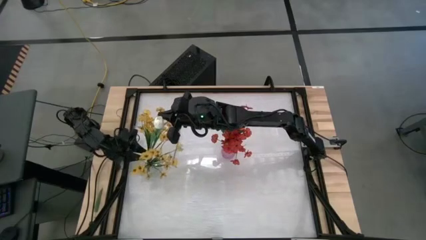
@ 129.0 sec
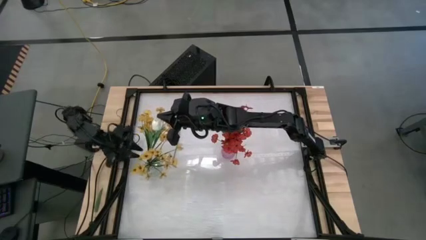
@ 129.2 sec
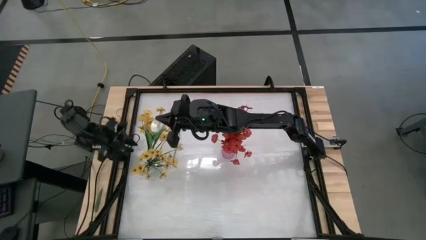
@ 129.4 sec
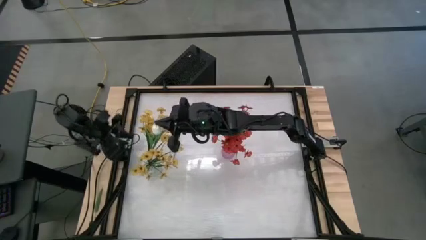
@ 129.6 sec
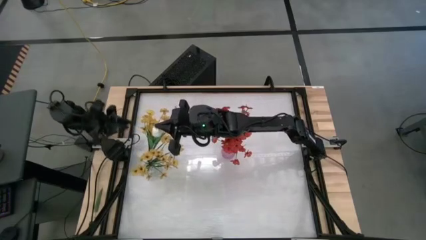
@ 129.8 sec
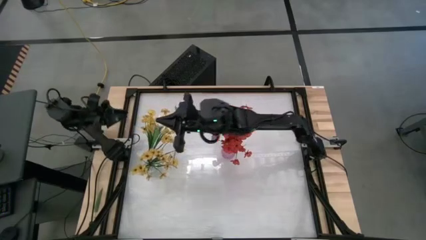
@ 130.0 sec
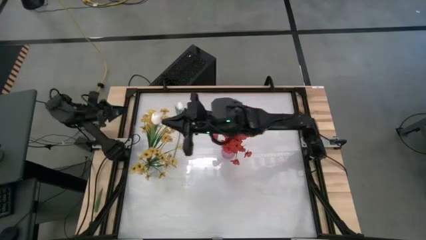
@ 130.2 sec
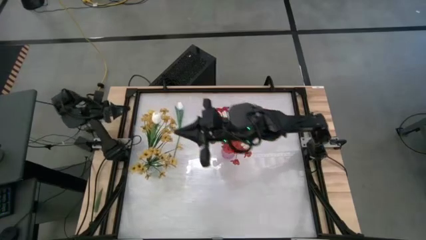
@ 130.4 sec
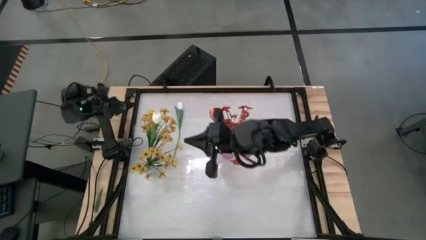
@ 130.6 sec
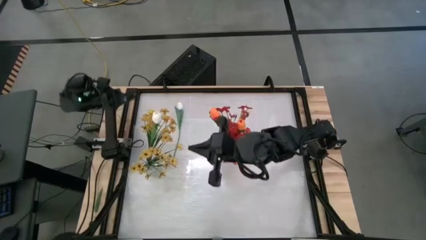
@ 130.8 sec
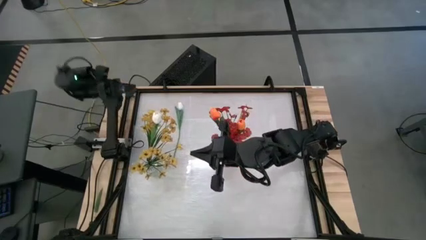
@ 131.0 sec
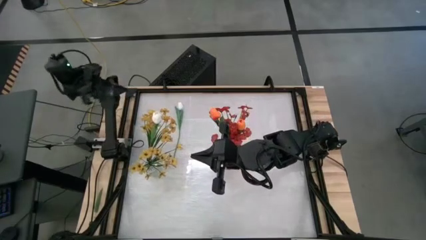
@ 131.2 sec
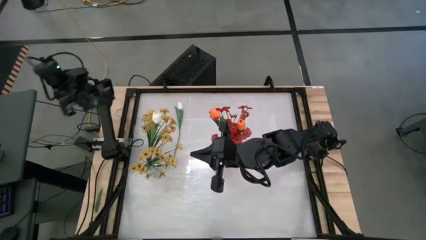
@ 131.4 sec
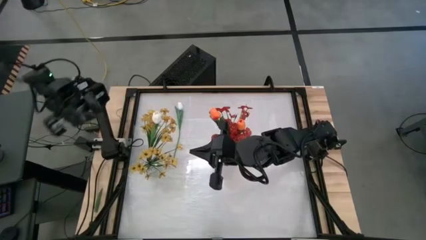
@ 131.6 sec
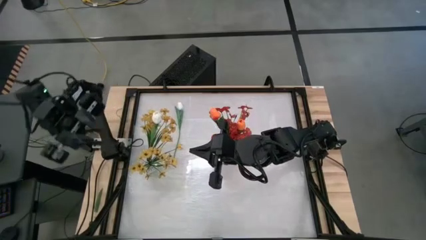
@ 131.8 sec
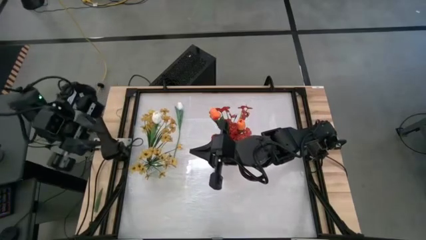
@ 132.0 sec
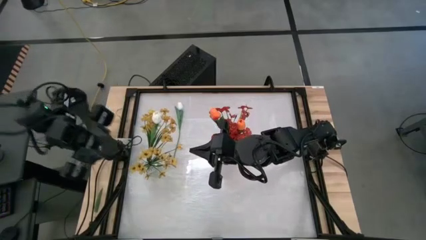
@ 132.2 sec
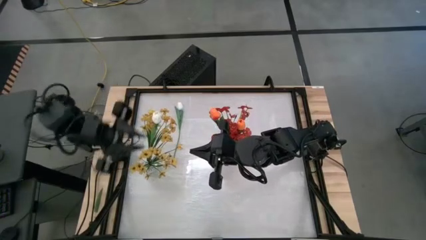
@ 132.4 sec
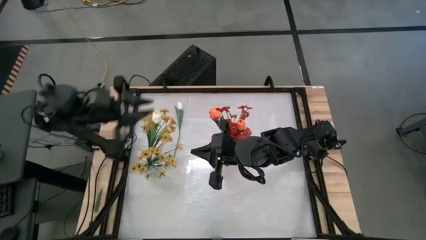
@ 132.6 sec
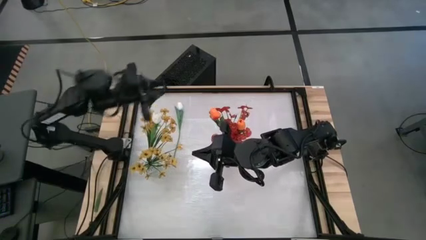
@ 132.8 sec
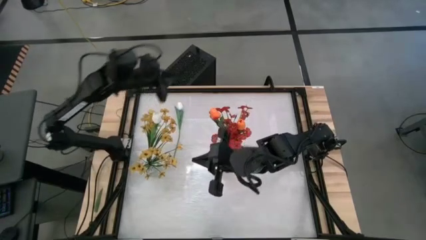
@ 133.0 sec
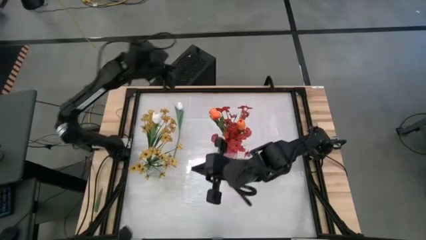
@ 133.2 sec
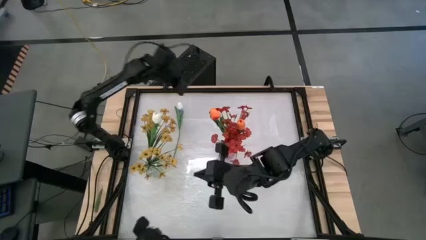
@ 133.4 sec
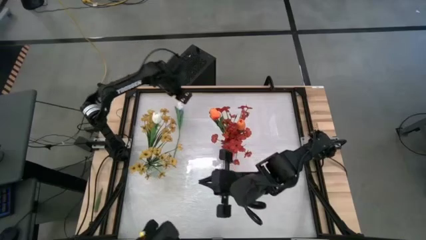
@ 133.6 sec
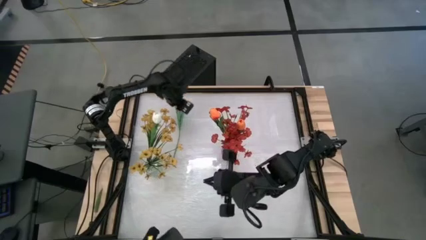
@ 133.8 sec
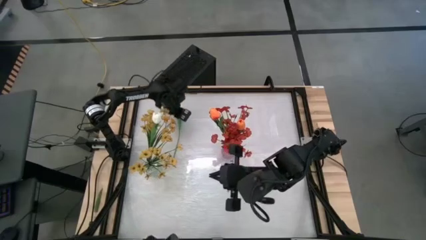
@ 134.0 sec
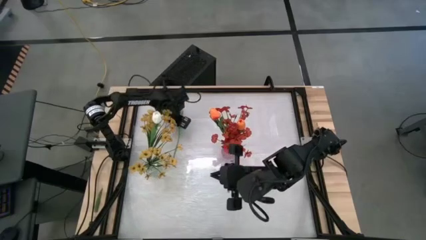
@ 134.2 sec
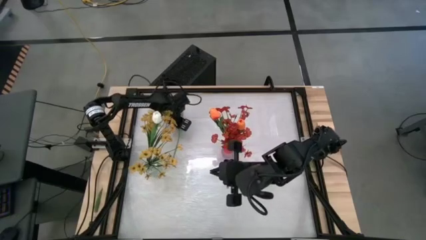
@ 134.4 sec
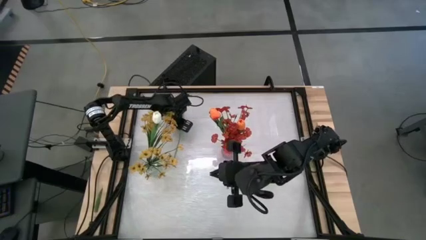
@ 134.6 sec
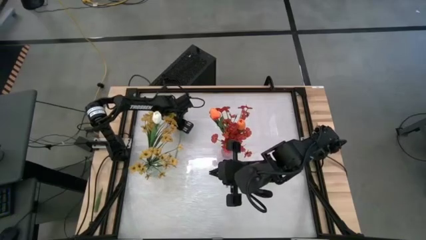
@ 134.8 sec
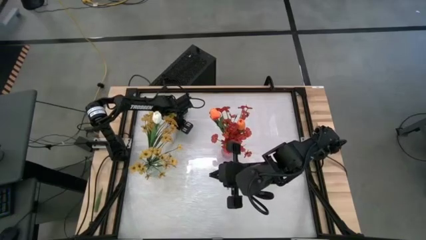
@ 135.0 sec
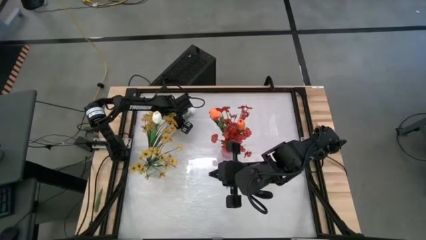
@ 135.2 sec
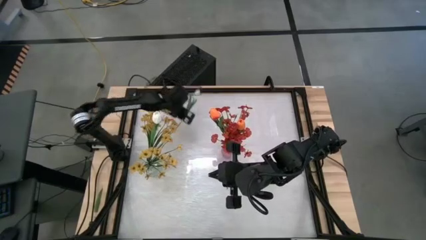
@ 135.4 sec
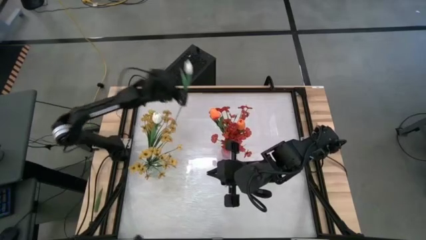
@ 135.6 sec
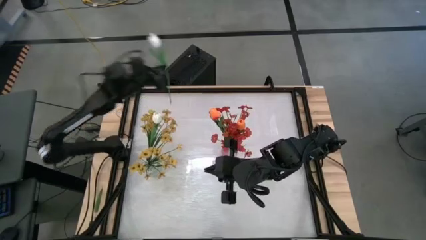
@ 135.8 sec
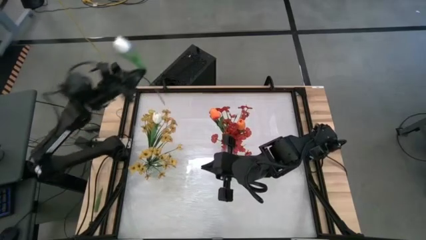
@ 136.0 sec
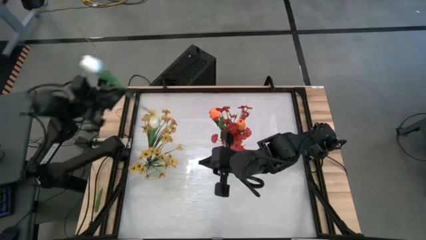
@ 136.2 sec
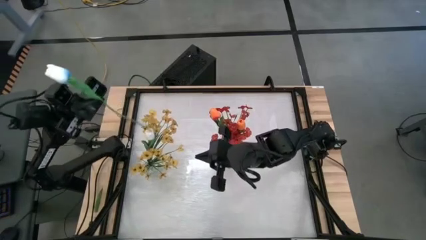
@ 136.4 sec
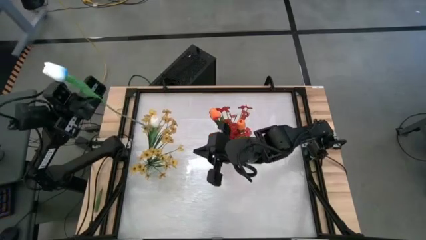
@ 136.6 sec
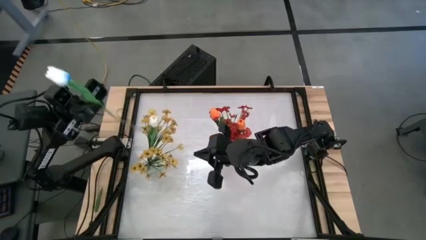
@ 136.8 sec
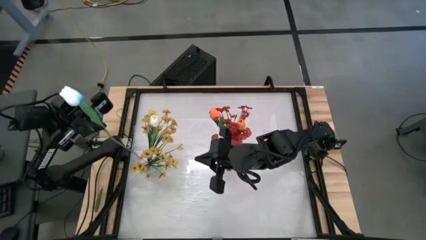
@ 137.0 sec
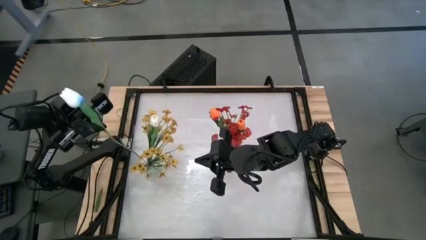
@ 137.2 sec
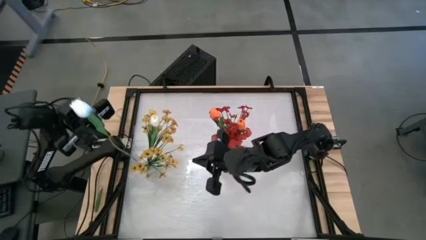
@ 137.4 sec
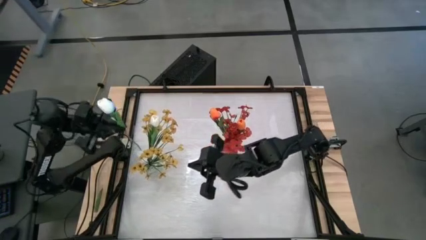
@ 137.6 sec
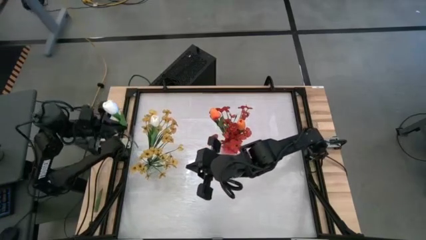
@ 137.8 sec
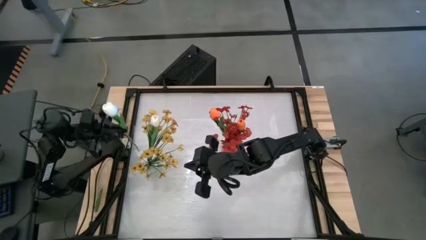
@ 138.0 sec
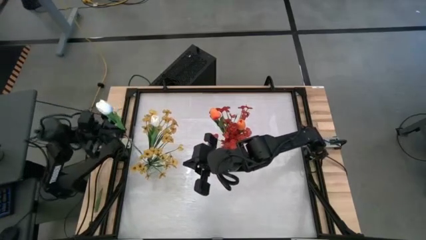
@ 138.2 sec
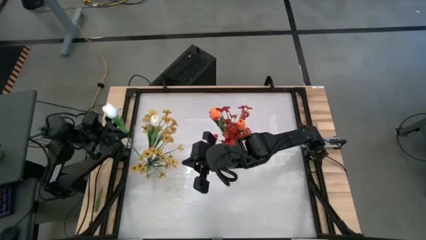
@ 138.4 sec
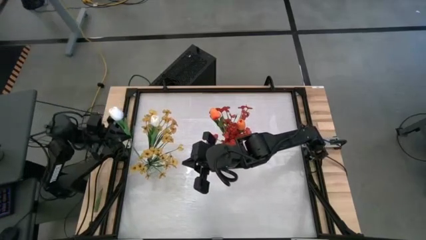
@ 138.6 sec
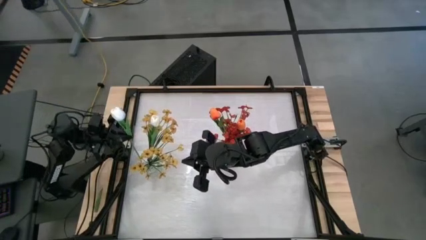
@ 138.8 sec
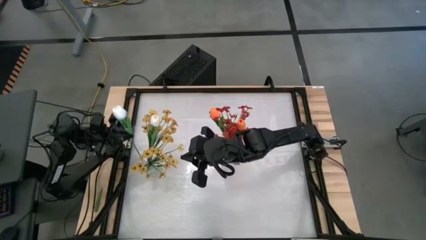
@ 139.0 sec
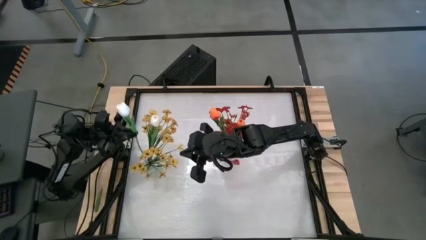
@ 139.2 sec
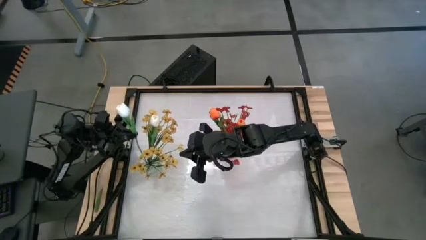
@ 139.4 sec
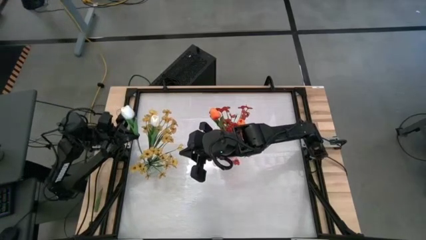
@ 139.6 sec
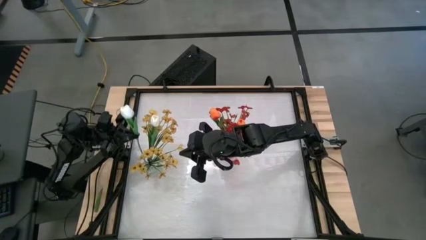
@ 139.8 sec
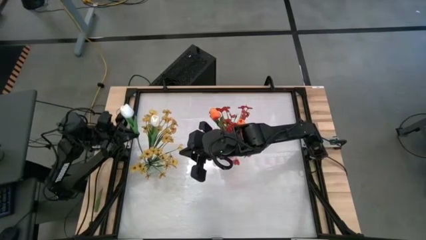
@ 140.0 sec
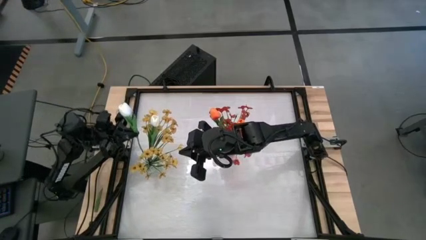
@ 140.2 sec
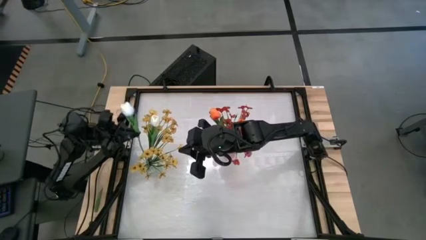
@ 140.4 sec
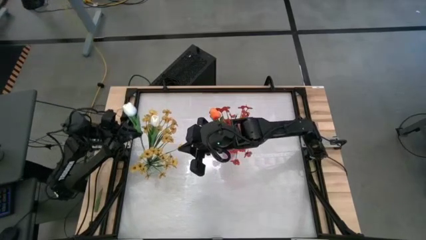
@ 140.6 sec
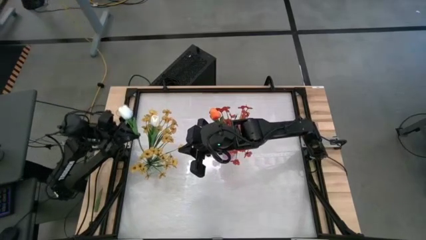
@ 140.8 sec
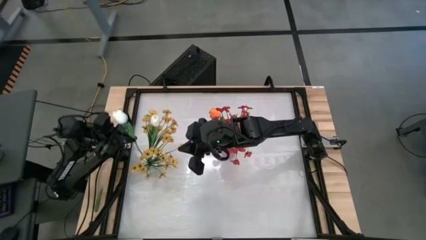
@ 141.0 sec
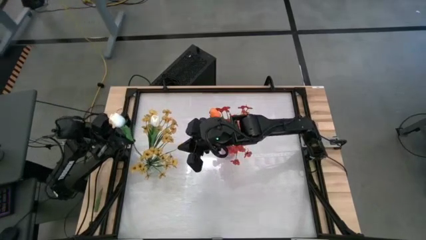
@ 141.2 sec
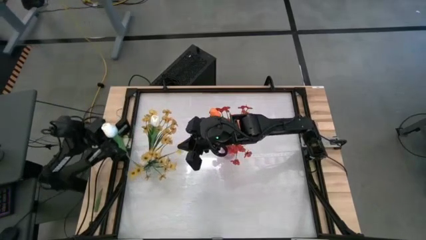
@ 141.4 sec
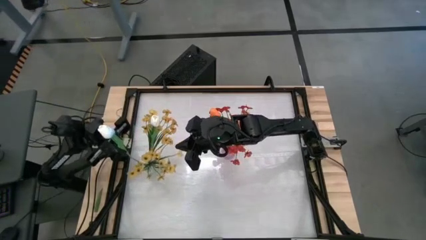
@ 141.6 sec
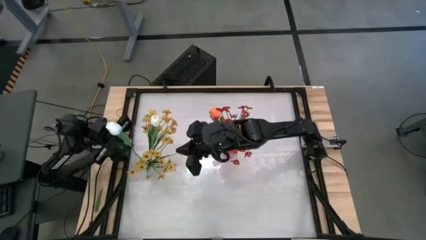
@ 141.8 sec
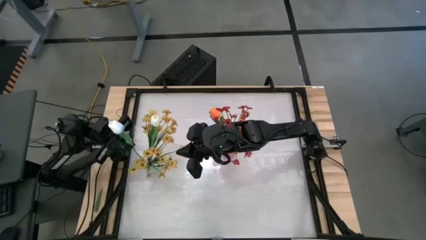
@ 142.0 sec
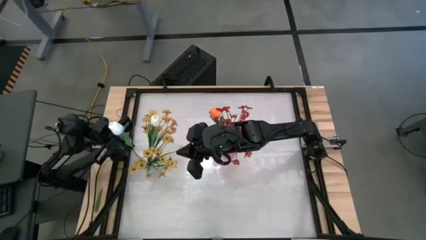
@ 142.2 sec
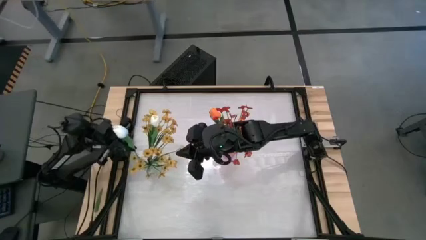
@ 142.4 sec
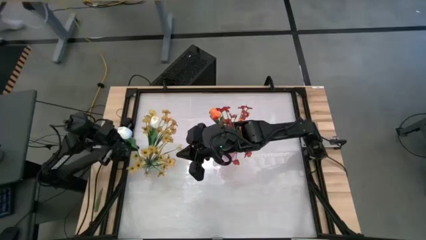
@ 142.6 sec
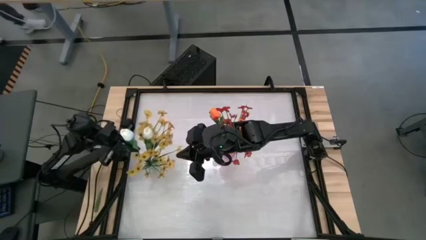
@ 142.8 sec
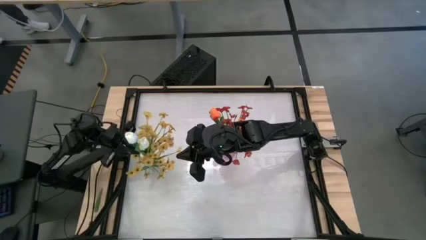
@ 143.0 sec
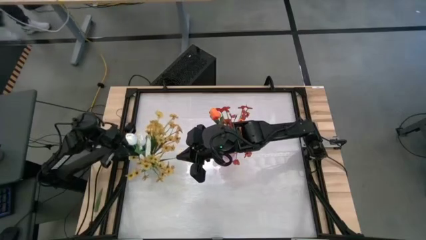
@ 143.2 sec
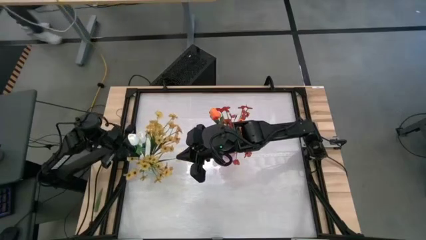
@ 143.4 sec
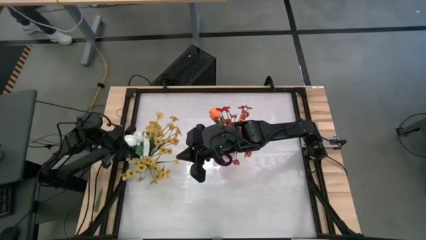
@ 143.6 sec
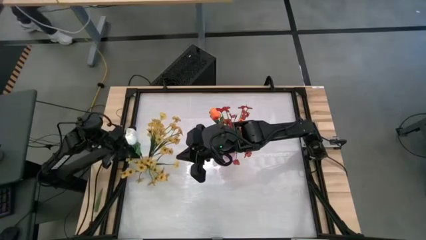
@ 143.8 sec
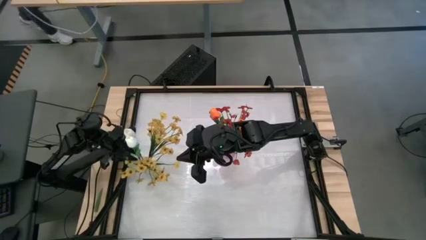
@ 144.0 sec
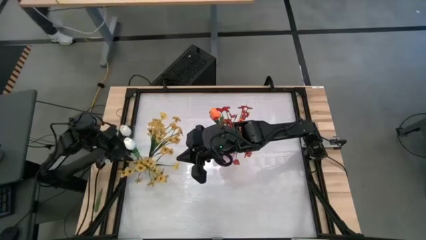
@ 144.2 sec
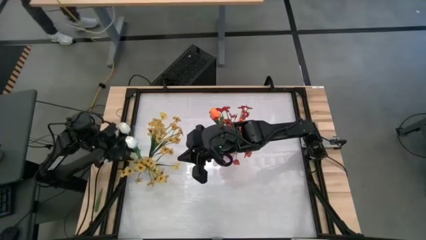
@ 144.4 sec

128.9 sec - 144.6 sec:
Task: Sort flowers into vase by color
Put the white flower into the transparent vase
